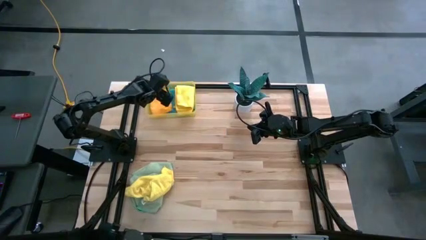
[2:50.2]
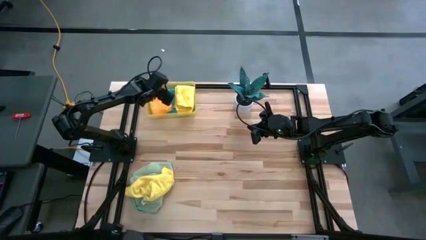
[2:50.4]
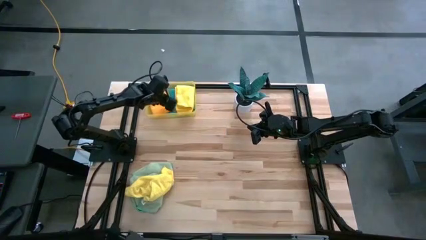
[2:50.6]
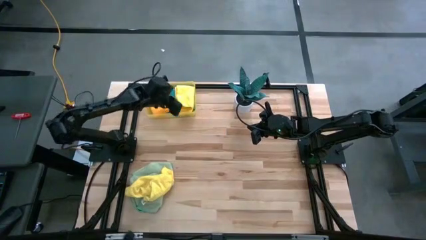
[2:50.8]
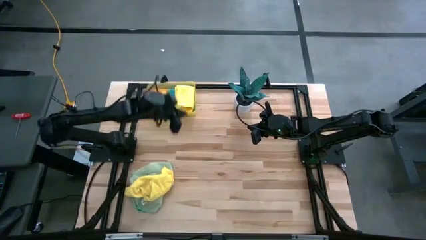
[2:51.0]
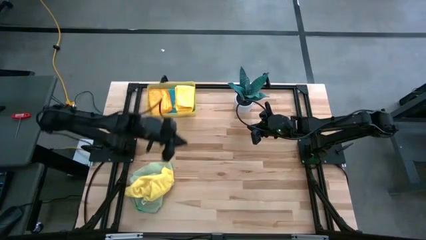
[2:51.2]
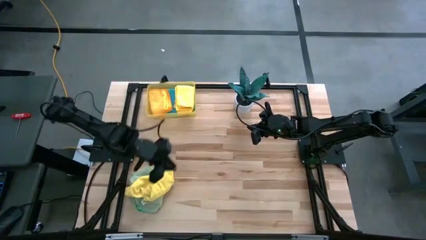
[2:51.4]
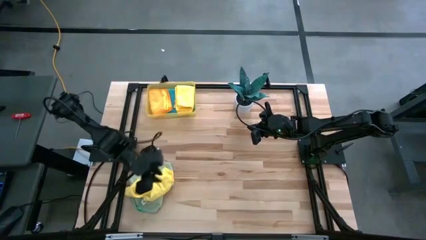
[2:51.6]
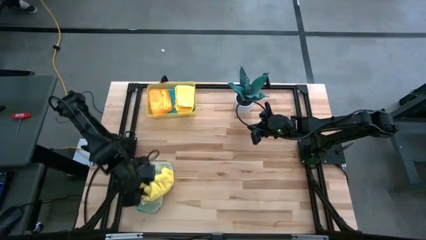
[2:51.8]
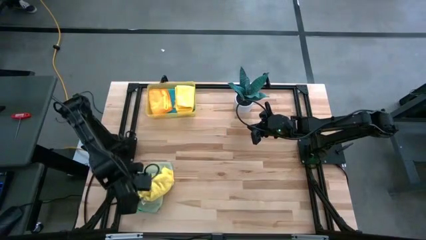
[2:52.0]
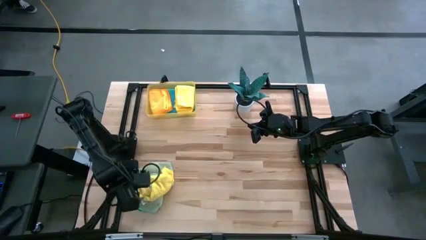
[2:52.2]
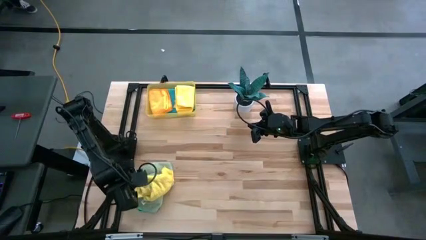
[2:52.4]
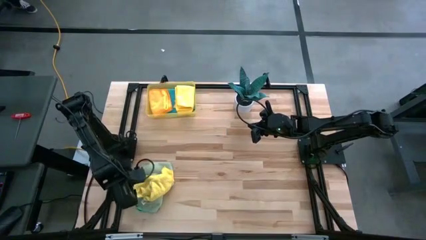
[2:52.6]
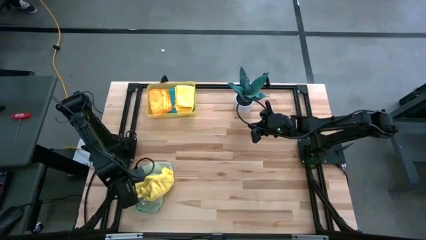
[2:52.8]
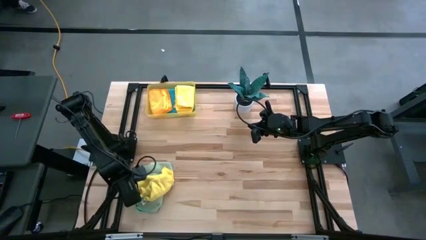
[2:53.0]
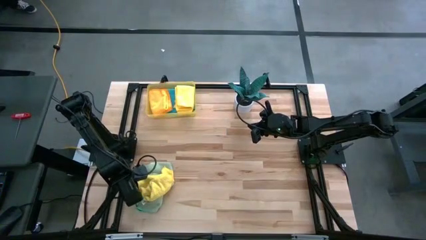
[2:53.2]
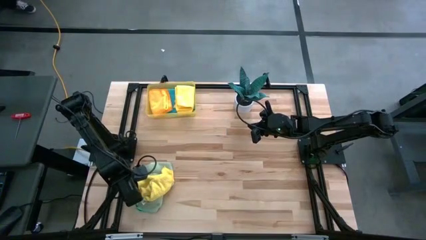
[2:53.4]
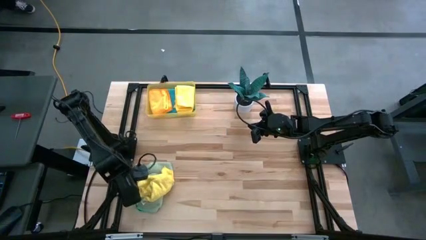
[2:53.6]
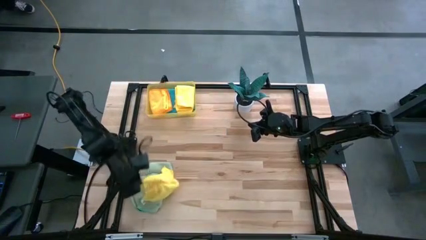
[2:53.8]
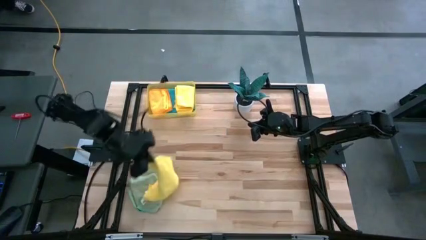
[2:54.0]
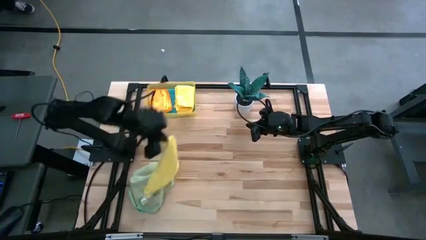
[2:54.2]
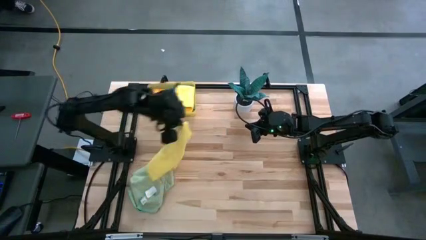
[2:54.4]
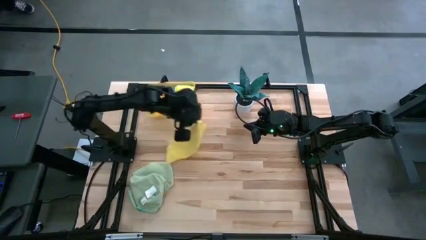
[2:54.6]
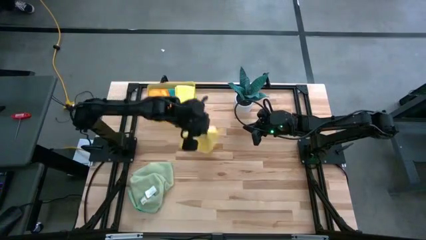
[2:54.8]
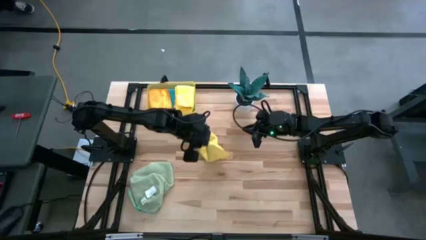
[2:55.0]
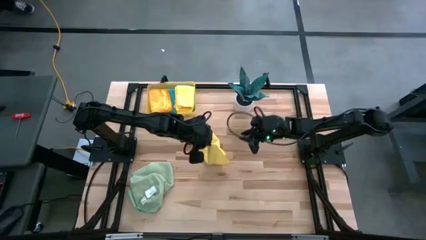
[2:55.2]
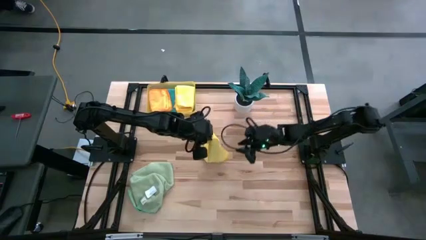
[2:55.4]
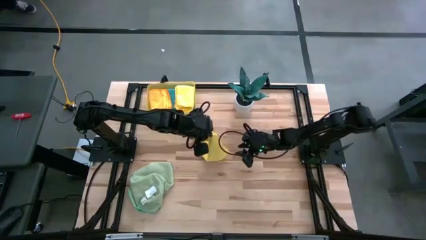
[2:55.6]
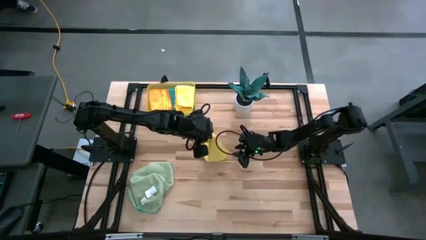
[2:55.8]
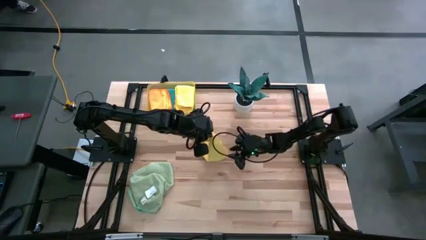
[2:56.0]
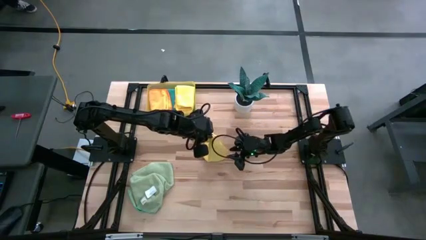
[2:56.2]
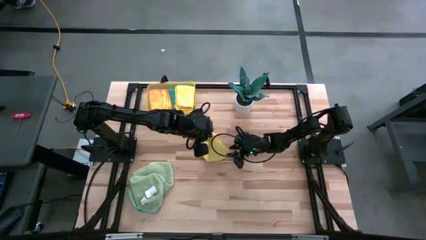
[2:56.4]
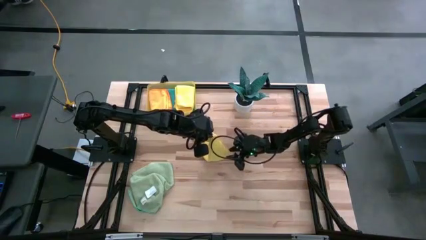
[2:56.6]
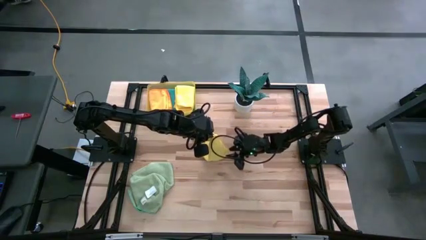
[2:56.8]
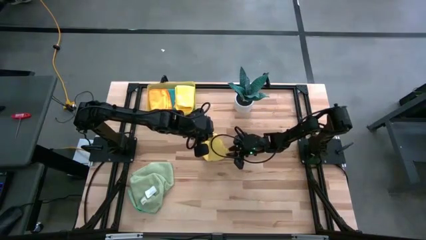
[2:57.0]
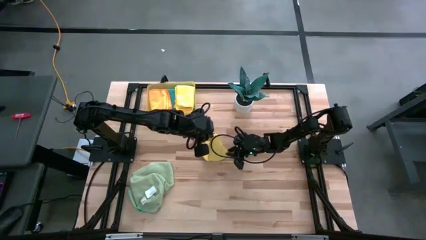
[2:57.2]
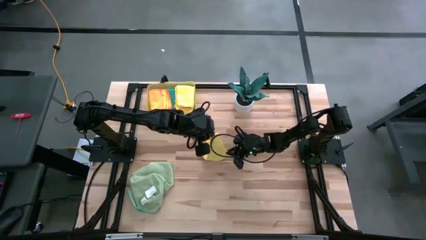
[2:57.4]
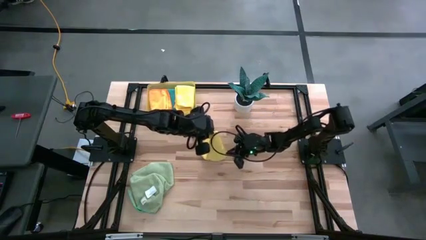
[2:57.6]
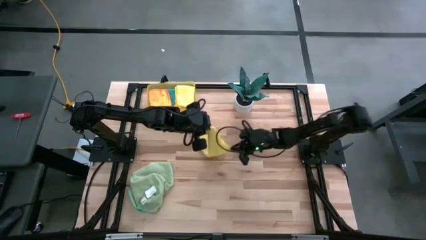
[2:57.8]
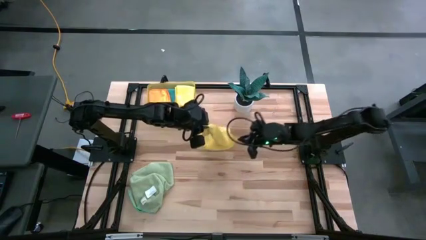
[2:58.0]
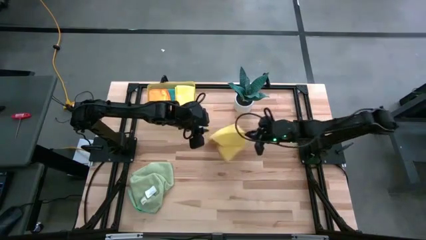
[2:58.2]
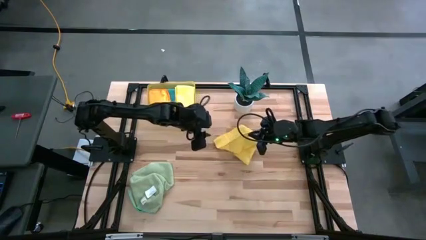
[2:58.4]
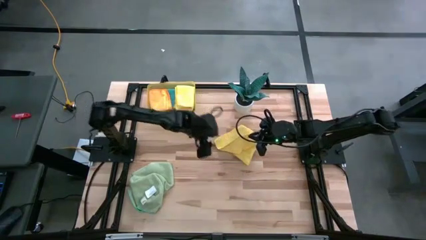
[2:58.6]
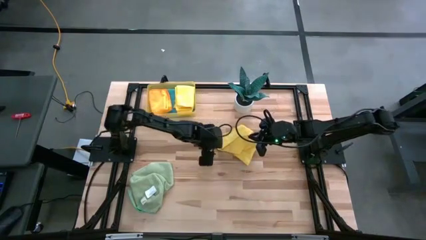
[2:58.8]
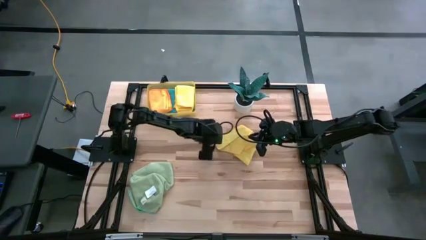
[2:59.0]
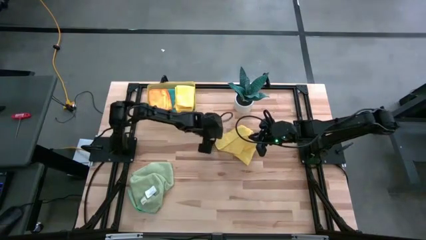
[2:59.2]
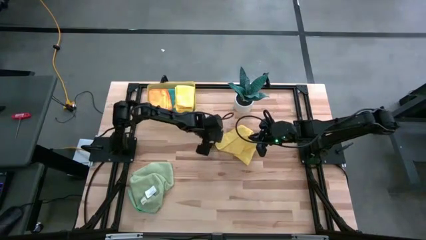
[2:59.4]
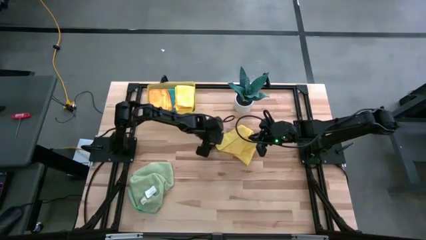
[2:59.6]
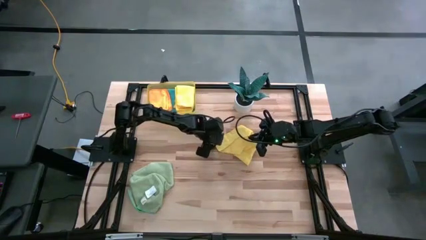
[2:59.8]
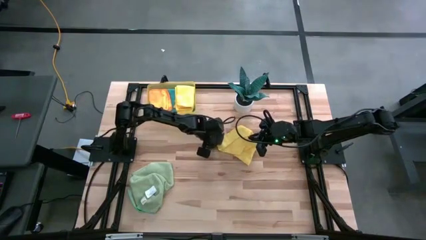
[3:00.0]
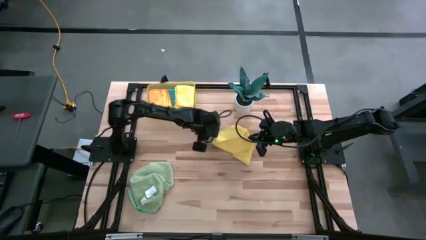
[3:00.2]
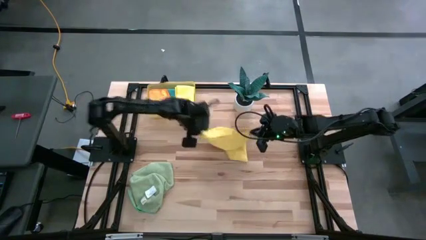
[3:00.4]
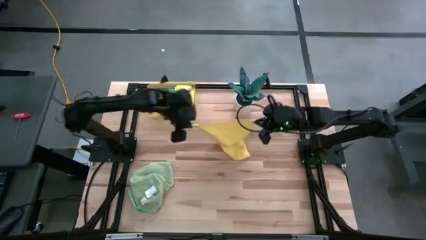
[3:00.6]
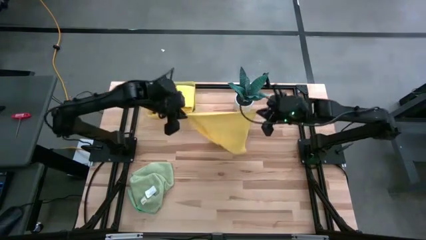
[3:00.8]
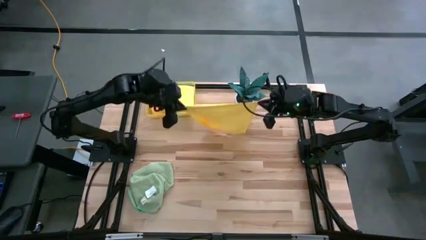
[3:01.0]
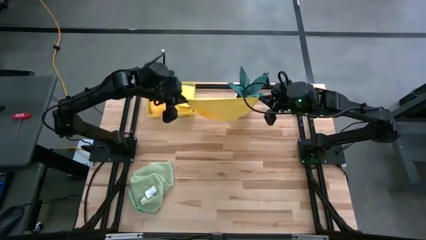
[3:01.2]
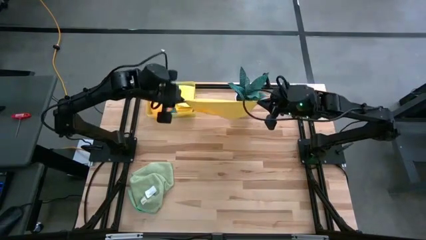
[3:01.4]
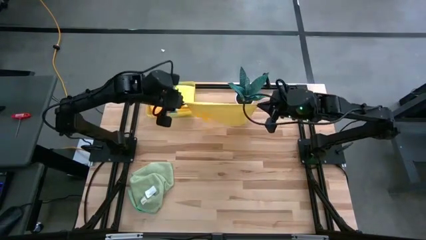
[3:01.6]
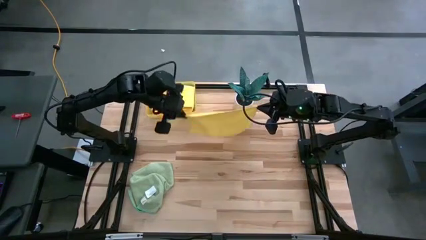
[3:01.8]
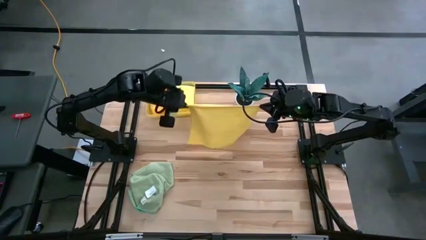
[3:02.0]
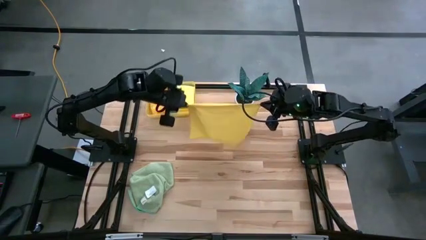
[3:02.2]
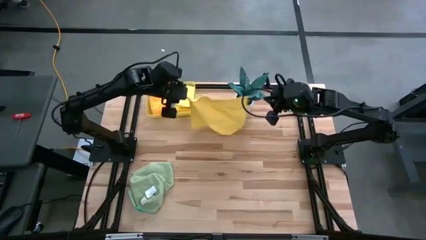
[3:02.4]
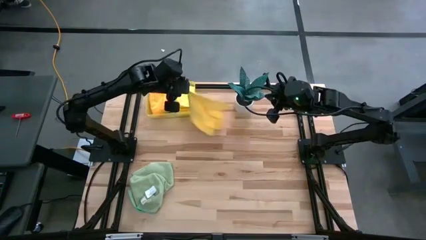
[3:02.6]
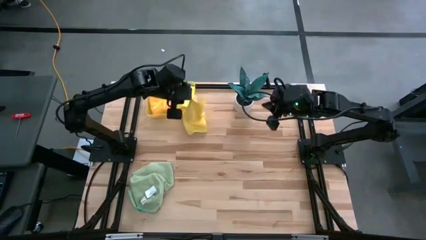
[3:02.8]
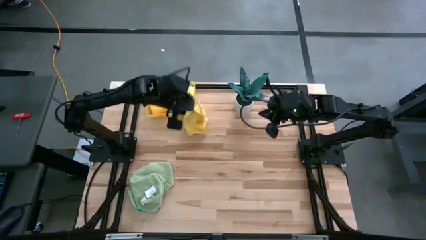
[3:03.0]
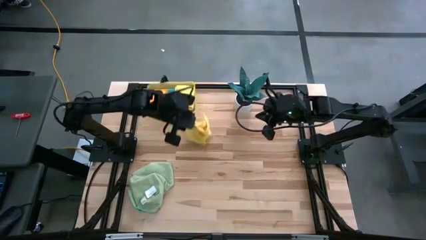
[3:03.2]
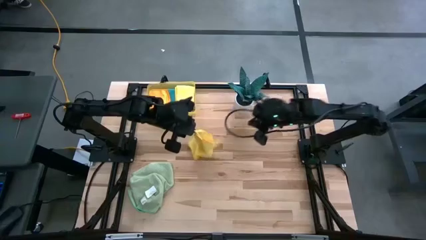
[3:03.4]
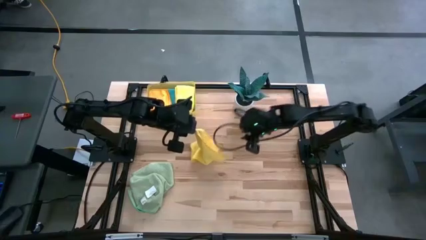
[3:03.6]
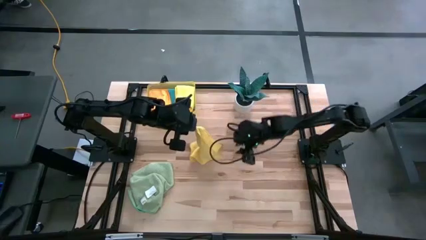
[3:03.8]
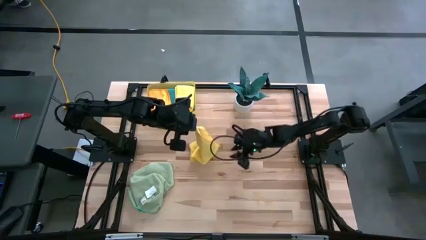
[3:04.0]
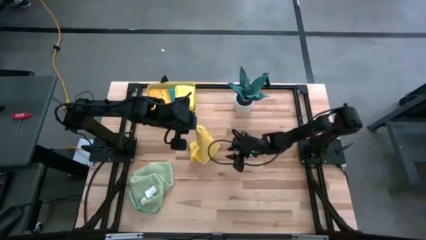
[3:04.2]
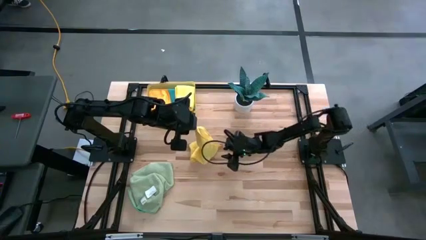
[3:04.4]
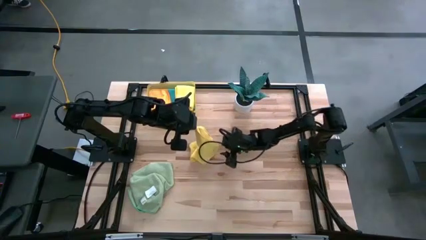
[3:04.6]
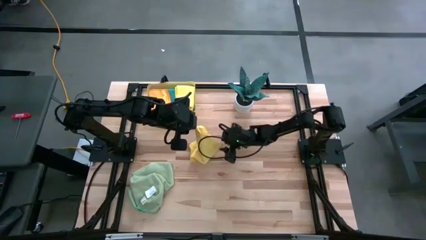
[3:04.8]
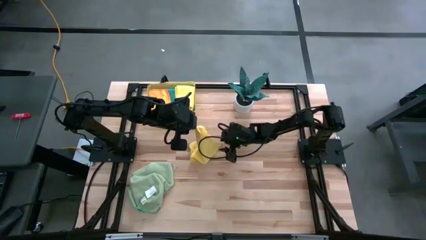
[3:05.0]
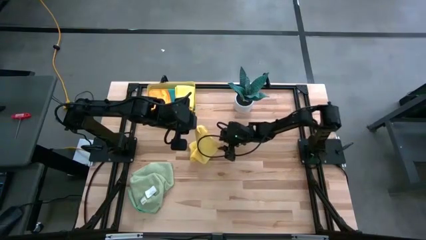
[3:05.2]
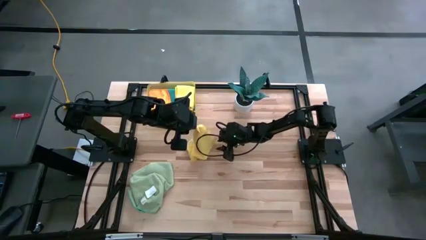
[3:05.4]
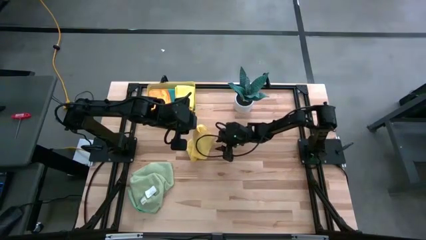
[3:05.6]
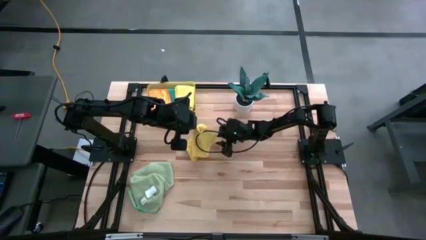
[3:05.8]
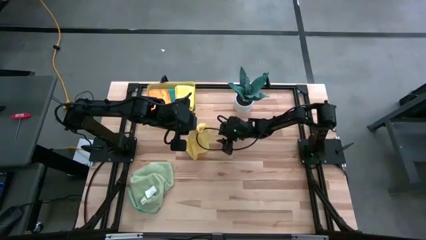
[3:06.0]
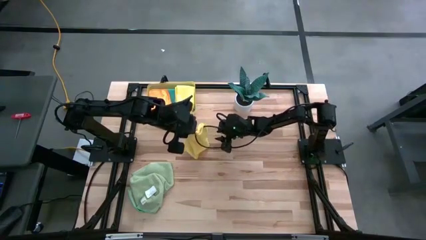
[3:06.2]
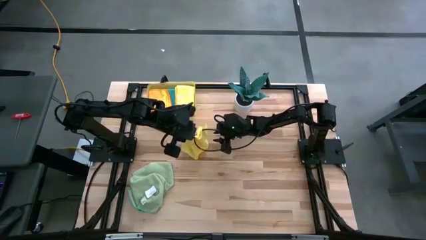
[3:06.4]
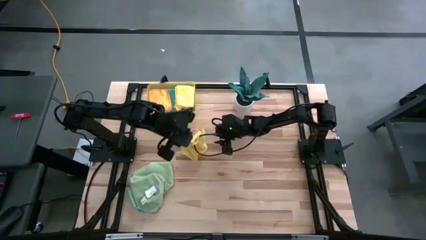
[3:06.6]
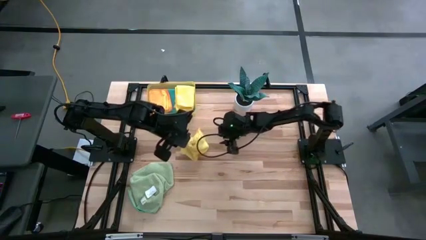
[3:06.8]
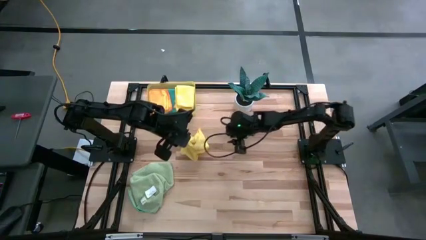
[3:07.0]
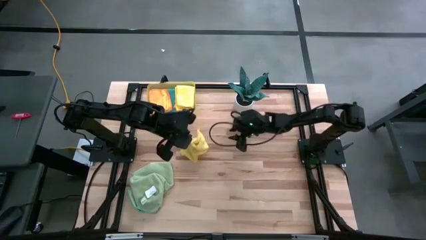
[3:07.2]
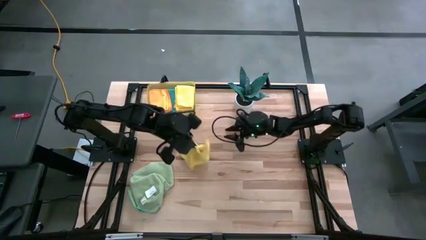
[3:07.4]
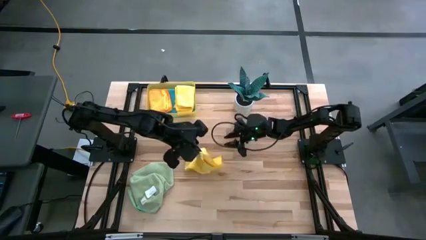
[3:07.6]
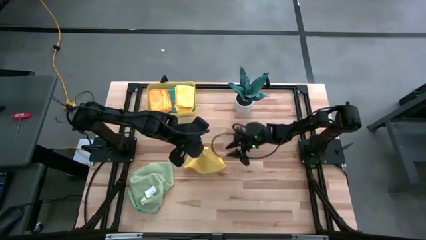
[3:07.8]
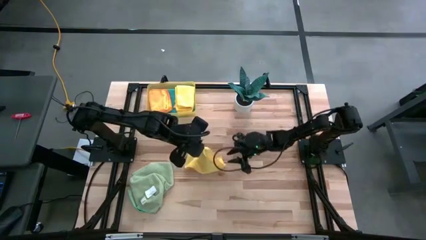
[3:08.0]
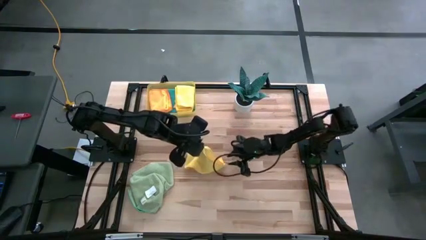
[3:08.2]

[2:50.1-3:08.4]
Task: Fold microfiber towels
Fold the yellow microfiber cloth
